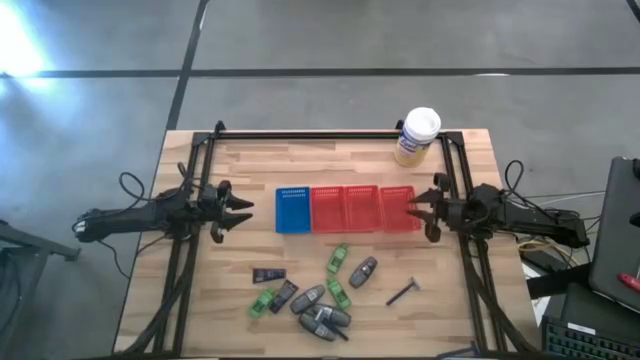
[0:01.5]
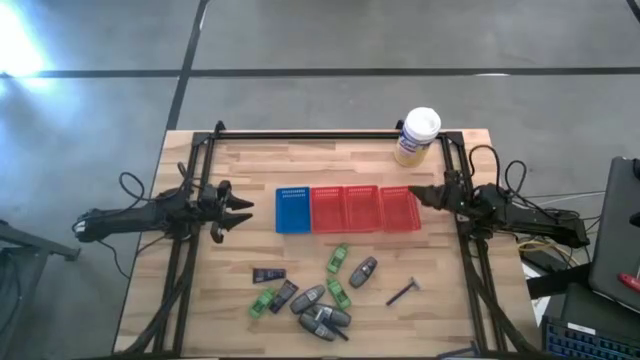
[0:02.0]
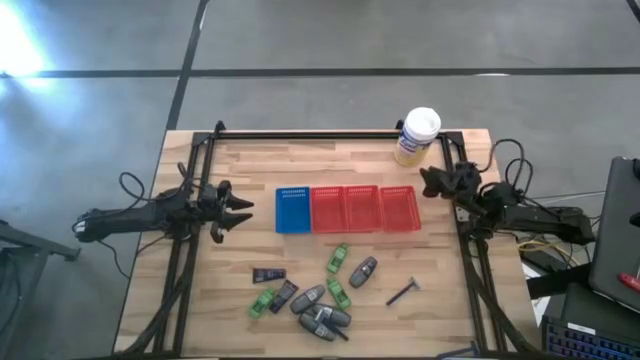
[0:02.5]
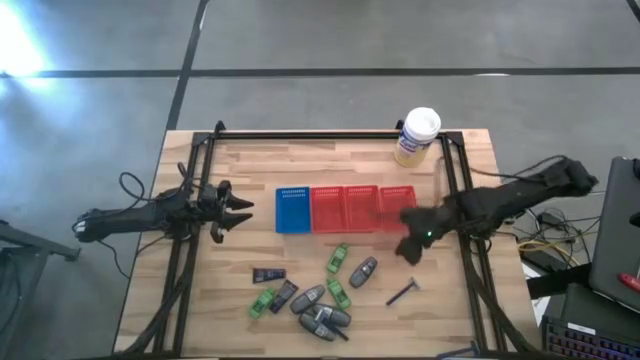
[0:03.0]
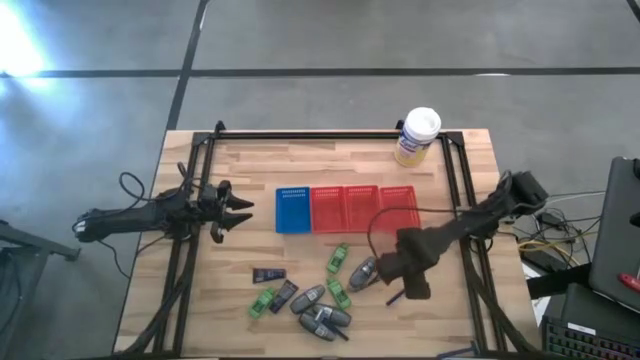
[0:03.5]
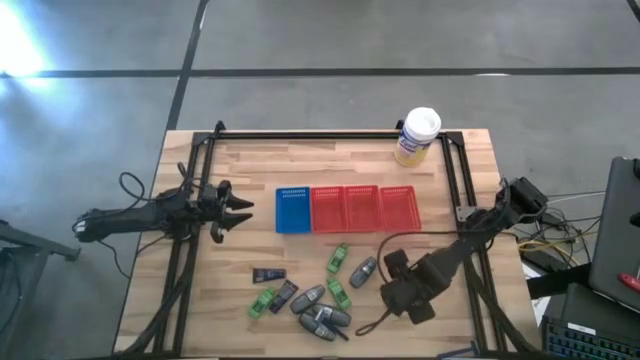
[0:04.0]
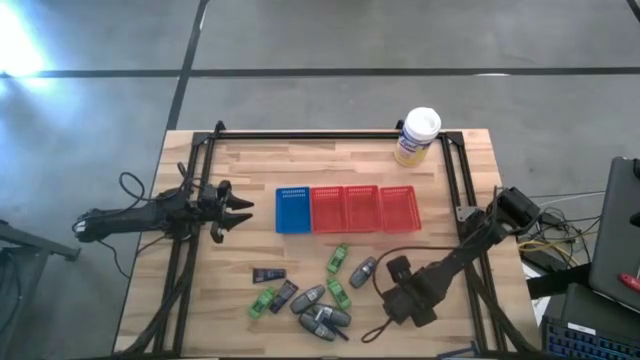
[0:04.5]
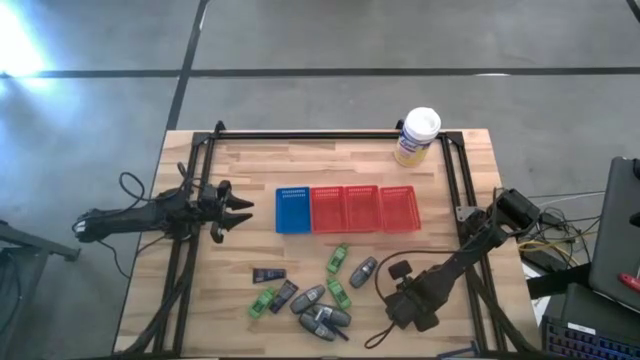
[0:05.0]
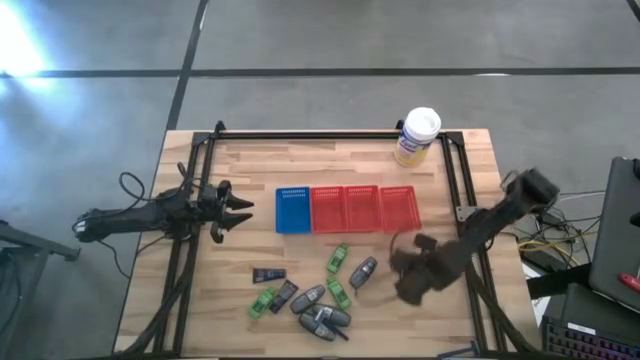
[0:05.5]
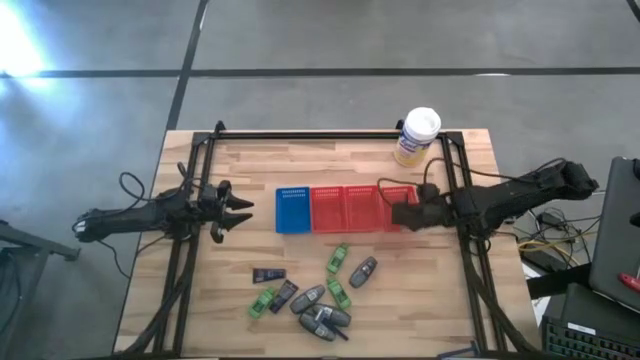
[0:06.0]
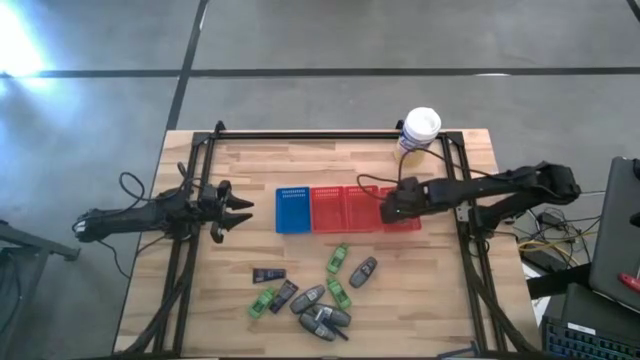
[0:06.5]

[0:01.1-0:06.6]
Task: Pick & Place Travel size toiletries
Put the blue razor into the right red bin

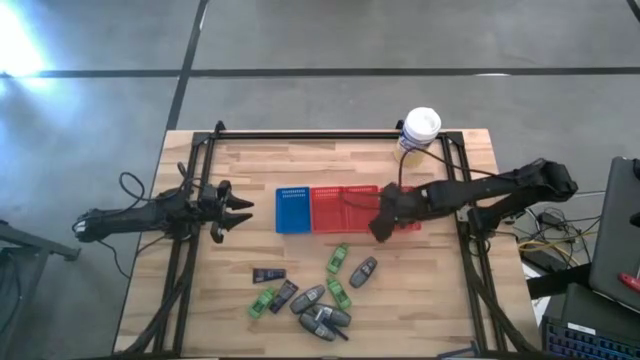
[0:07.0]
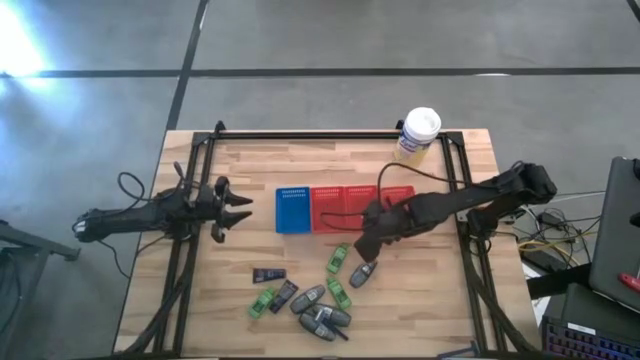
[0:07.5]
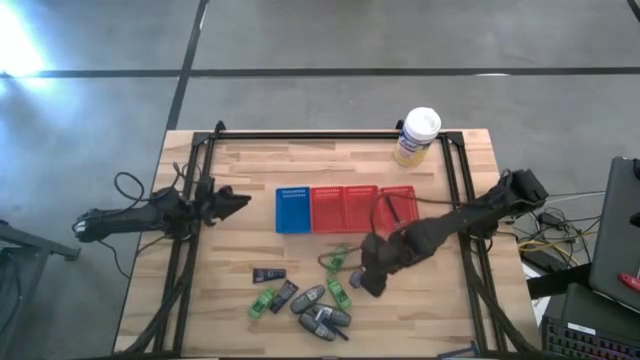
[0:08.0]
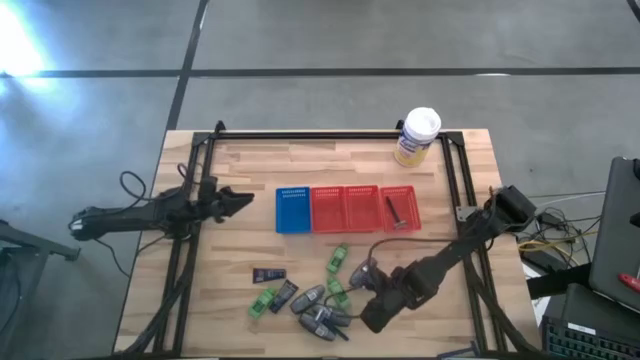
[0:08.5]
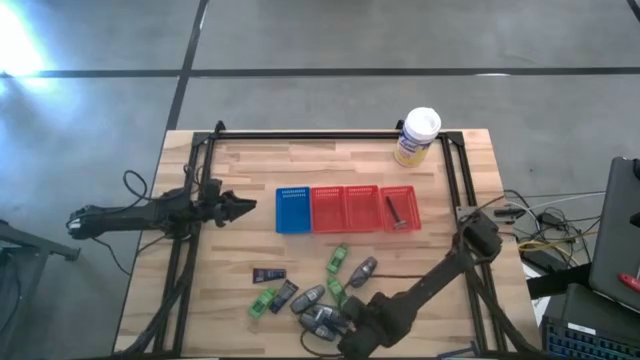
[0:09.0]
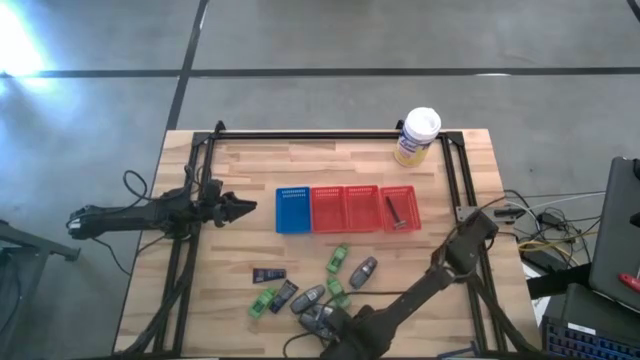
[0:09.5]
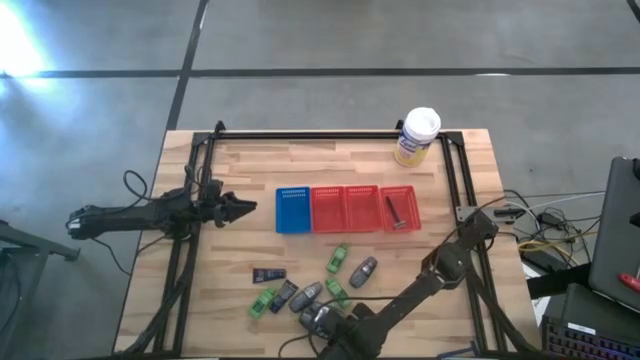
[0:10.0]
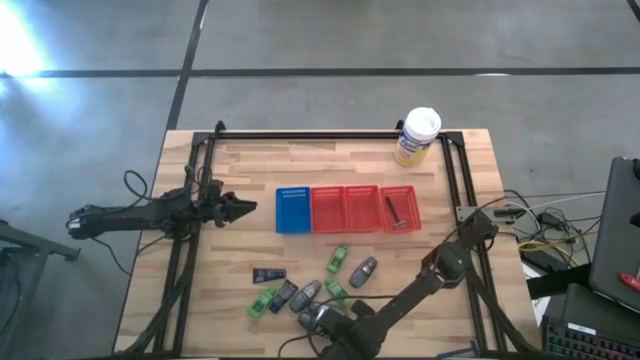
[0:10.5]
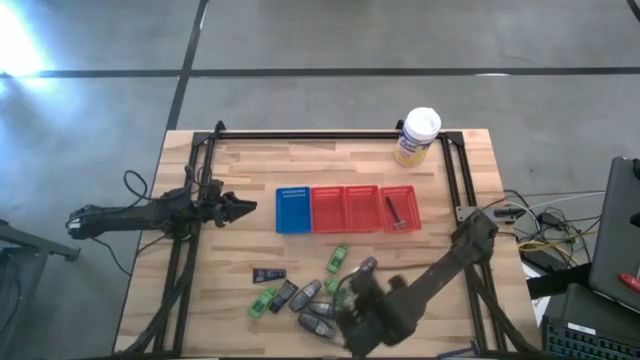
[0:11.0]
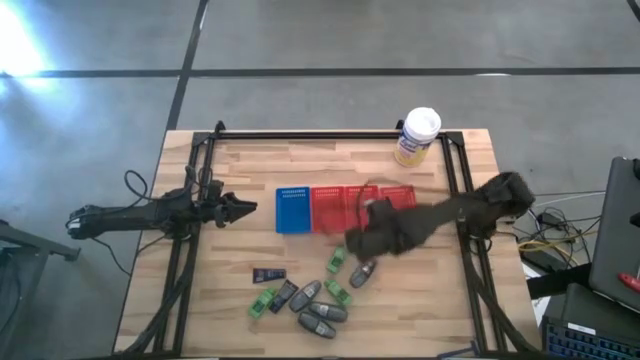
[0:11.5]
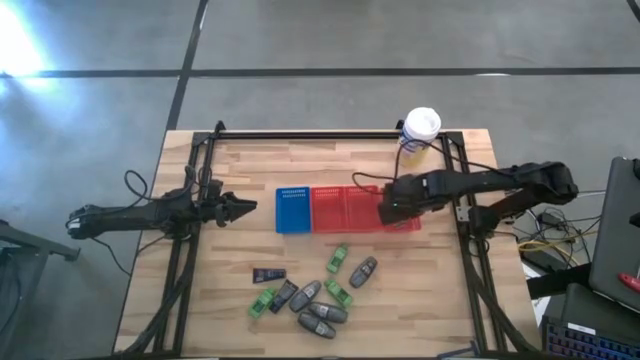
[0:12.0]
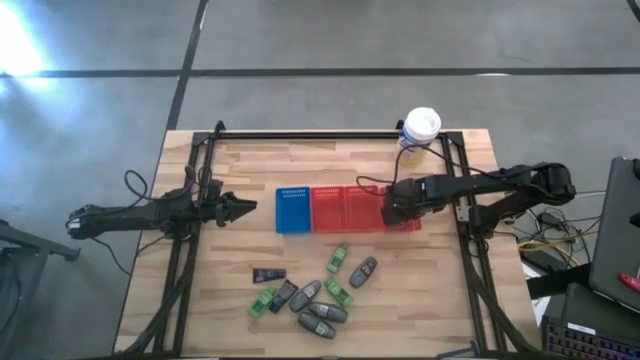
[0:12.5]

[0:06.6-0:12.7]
Put the blue razor into the right red bin

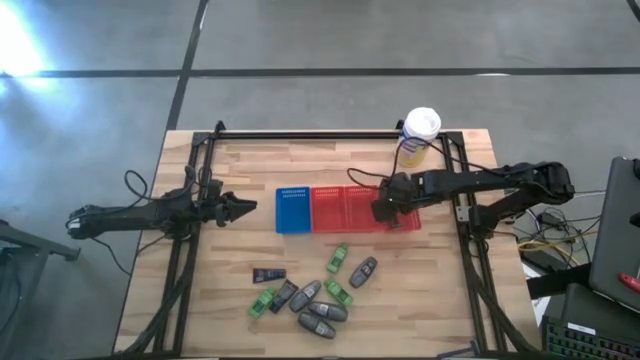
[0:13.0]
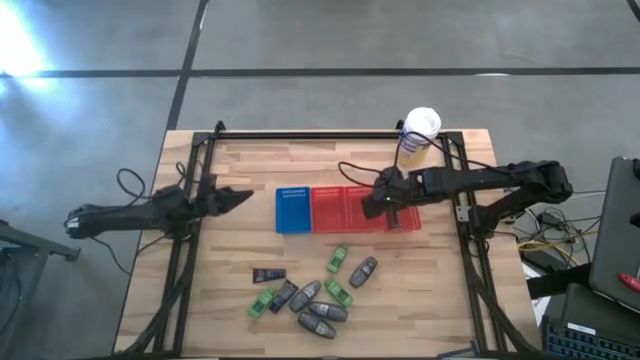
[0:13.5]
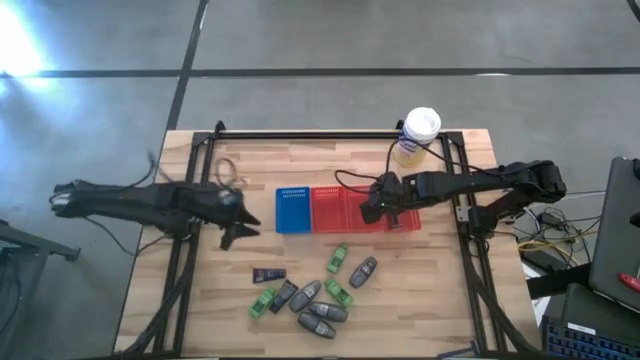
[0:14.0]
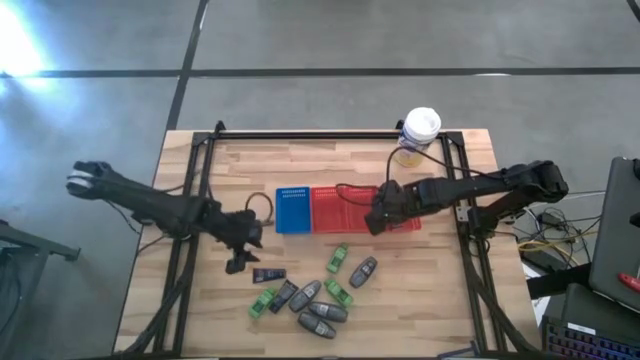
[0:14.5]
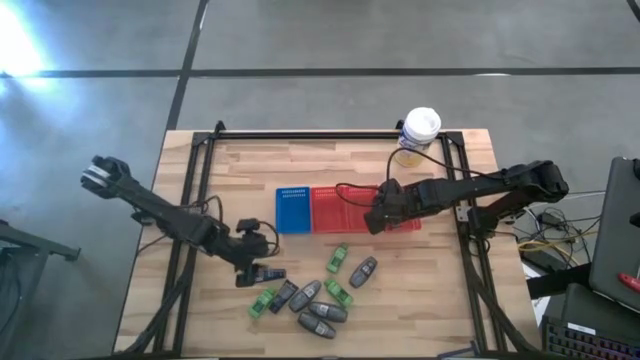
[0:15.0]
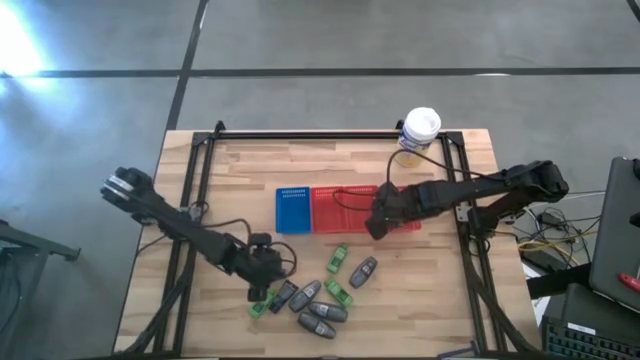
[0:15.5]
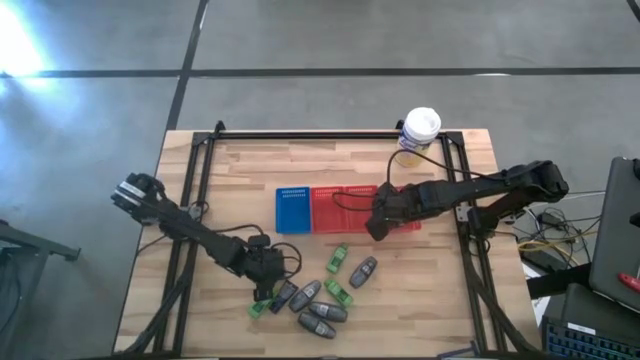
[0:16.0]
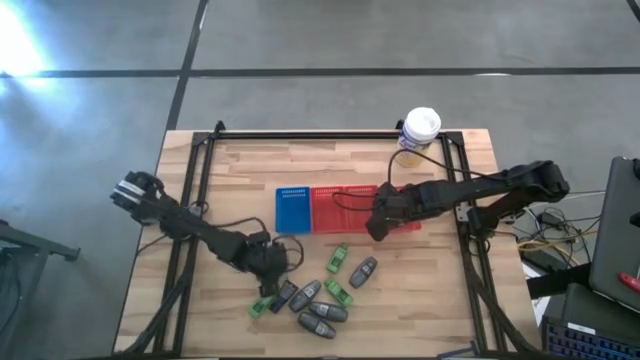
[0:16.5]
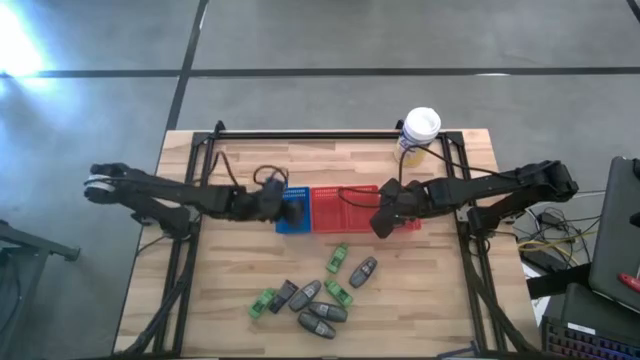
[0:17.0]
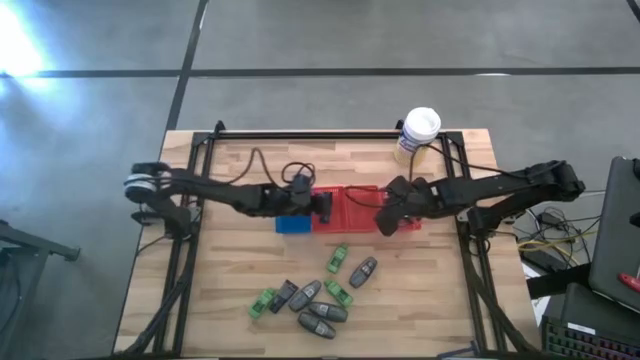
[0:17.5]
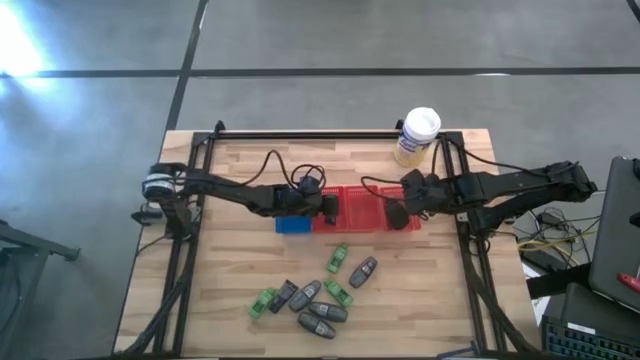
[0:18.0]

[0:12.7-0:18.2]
Put the blue shave cream into the left red bin

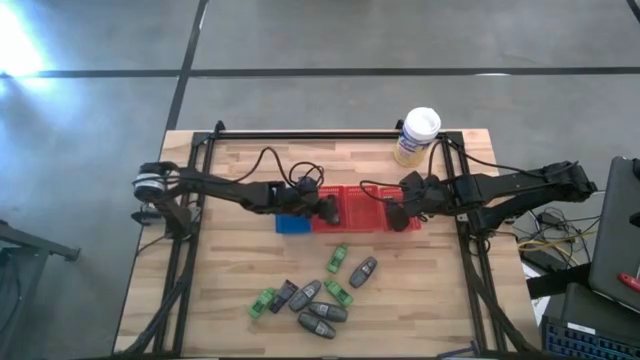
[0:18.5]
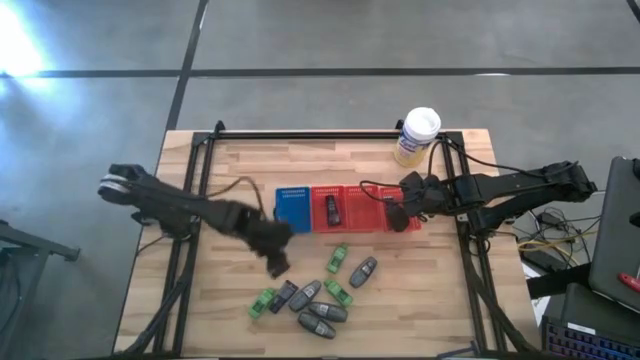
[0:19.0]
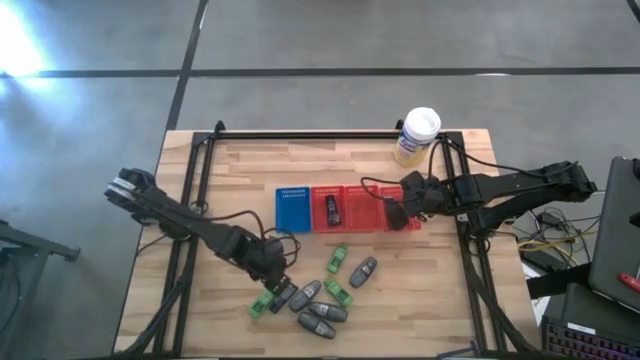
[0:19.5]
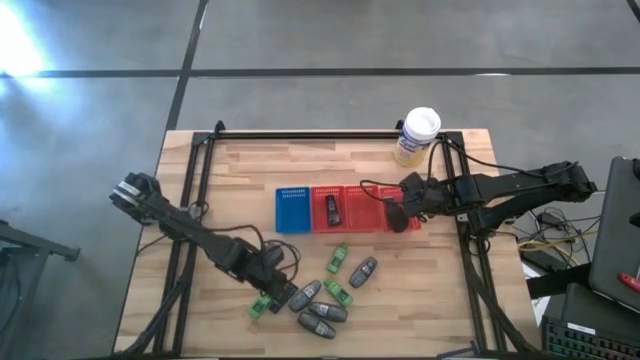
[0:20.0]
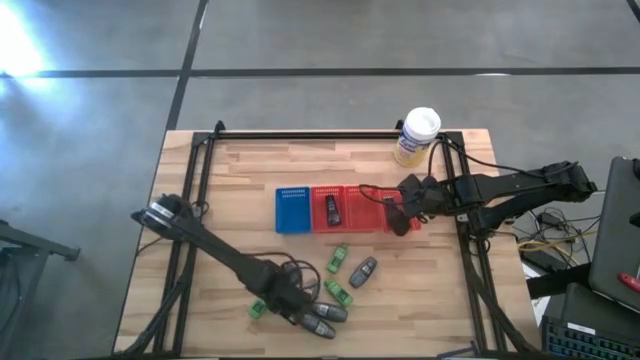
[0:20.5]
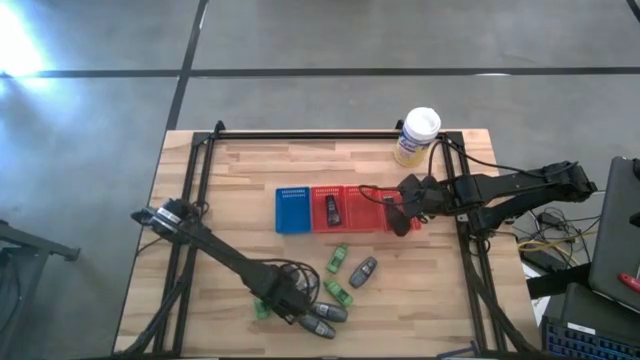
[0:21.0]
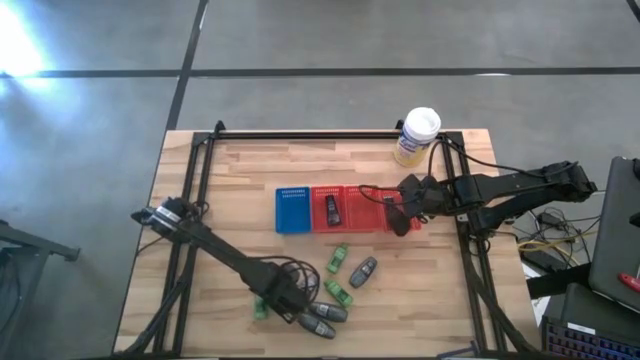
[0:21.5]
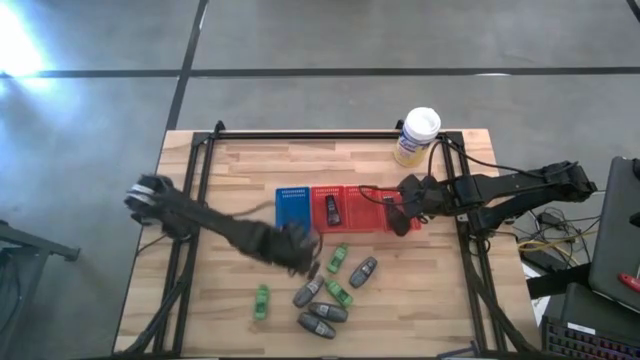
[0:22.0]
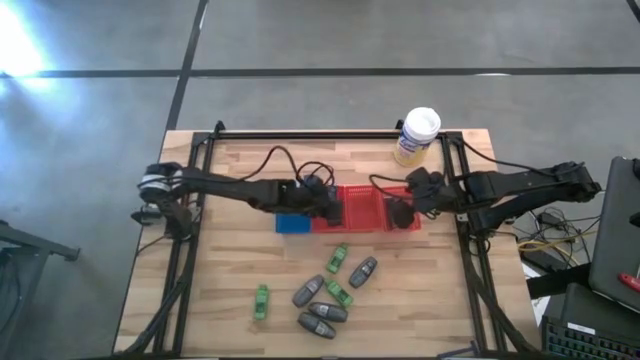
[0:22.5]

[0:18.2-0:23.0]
Put the blue shave cream into the left red bin
